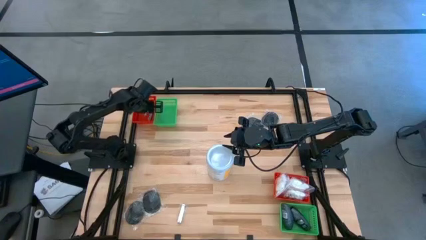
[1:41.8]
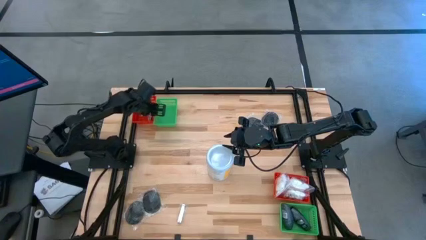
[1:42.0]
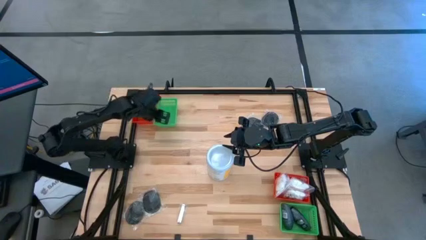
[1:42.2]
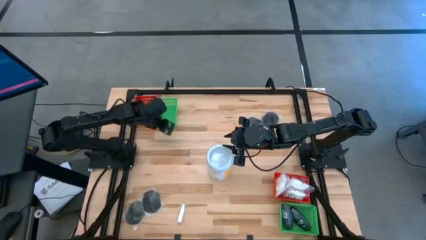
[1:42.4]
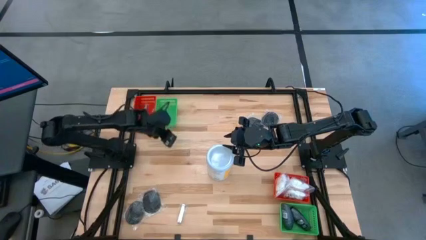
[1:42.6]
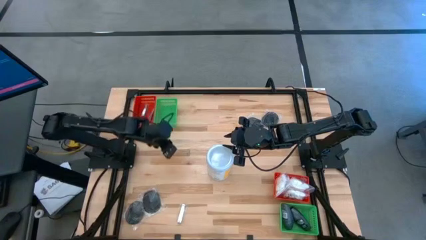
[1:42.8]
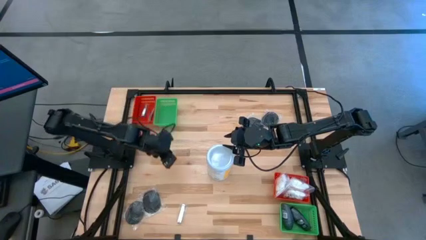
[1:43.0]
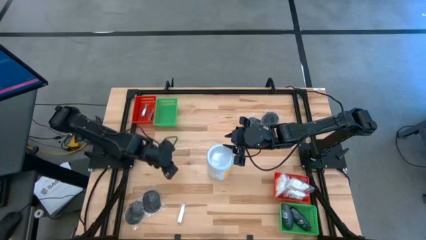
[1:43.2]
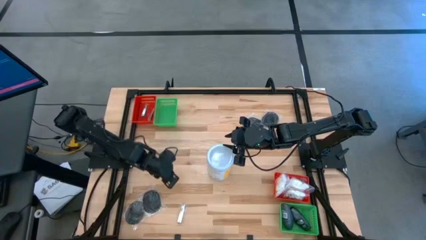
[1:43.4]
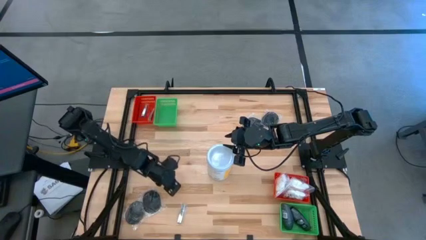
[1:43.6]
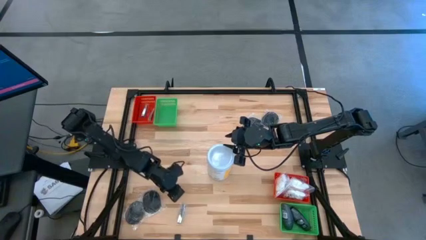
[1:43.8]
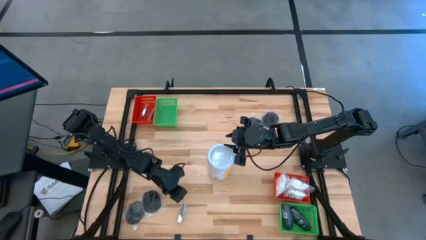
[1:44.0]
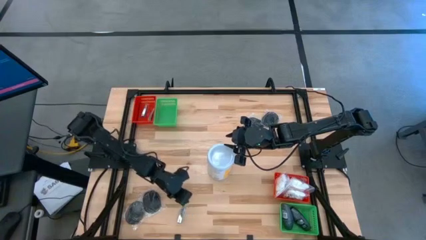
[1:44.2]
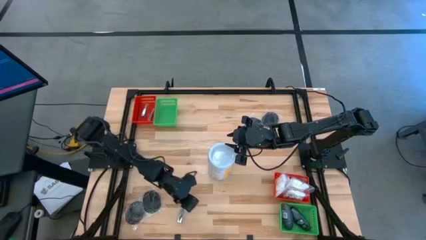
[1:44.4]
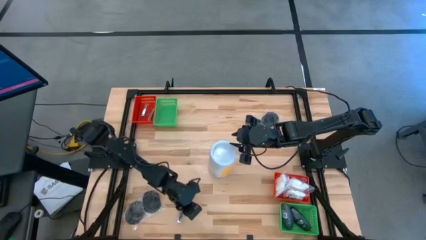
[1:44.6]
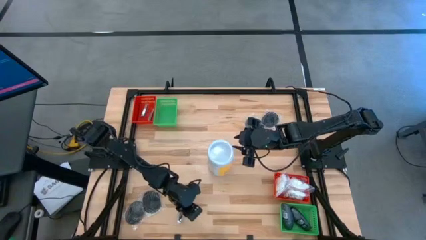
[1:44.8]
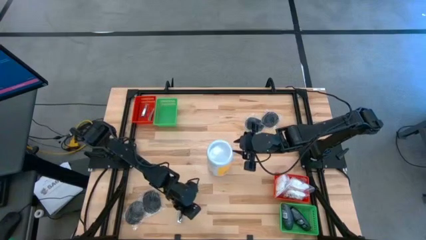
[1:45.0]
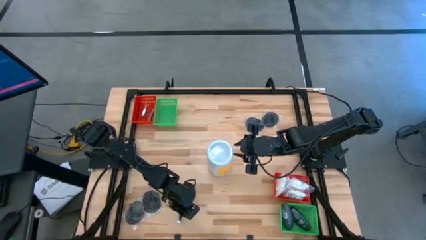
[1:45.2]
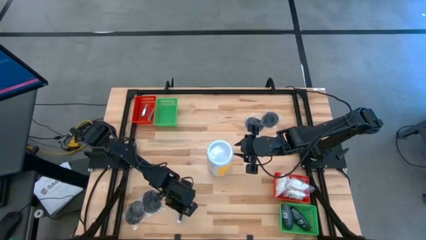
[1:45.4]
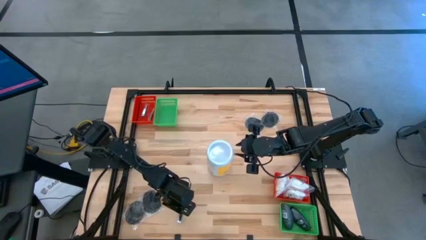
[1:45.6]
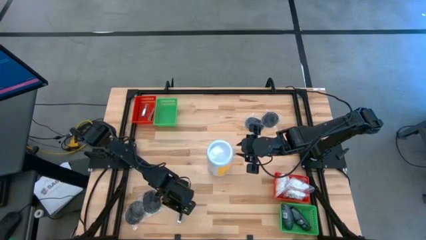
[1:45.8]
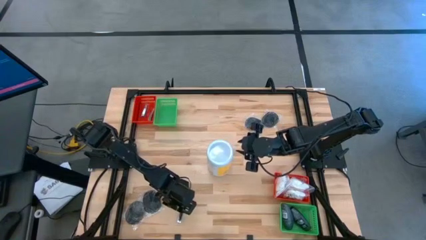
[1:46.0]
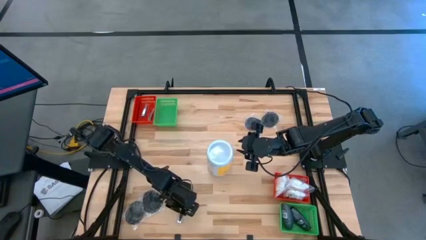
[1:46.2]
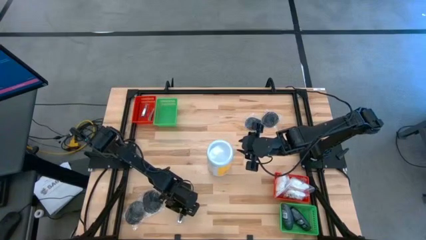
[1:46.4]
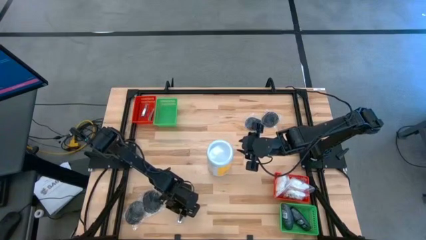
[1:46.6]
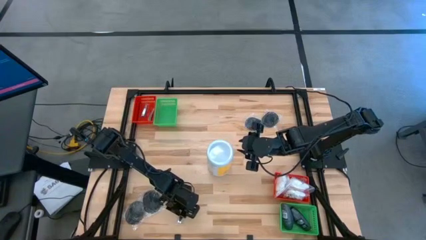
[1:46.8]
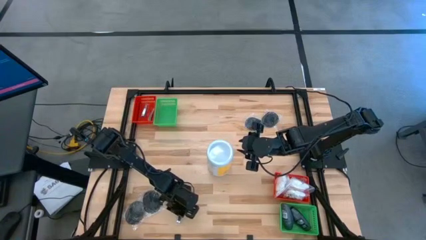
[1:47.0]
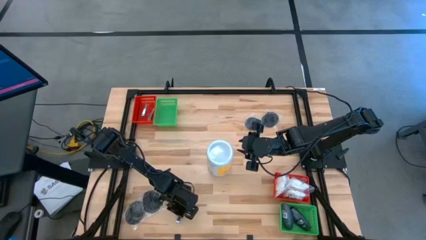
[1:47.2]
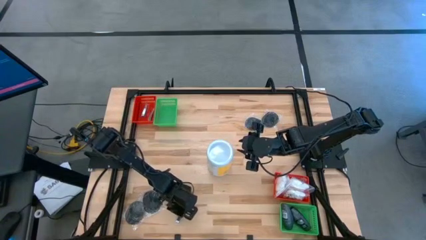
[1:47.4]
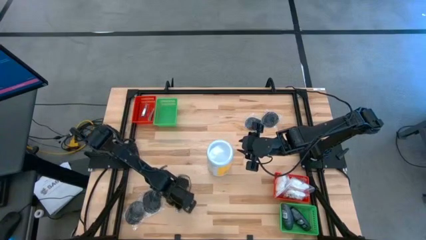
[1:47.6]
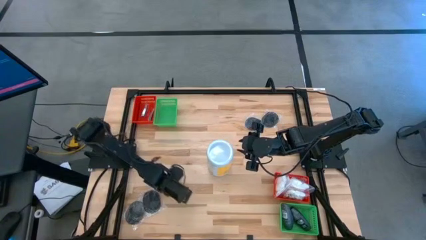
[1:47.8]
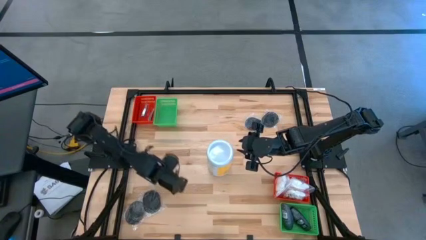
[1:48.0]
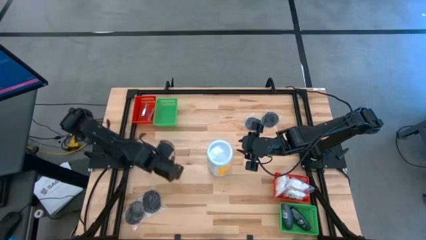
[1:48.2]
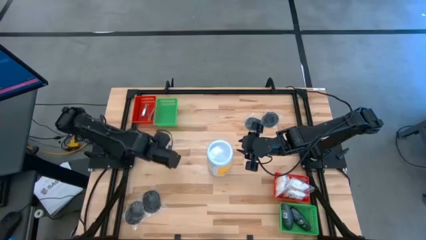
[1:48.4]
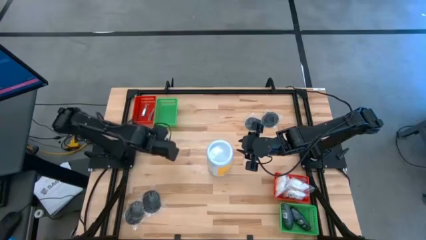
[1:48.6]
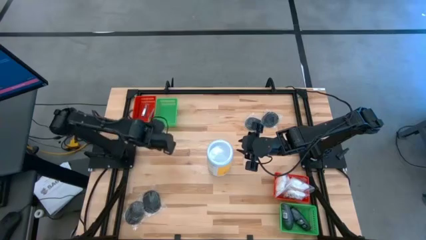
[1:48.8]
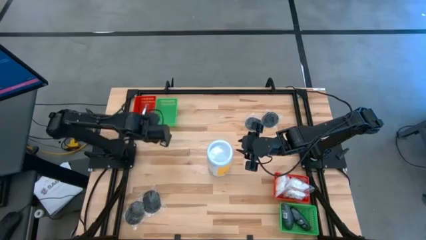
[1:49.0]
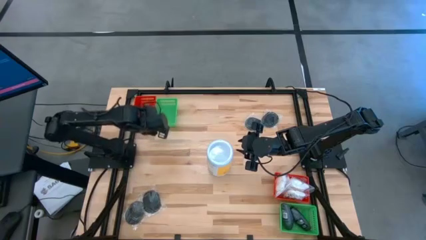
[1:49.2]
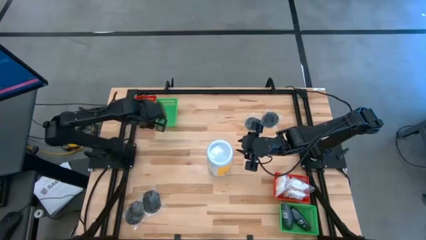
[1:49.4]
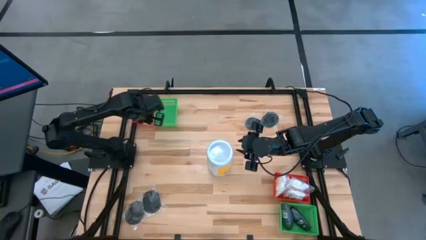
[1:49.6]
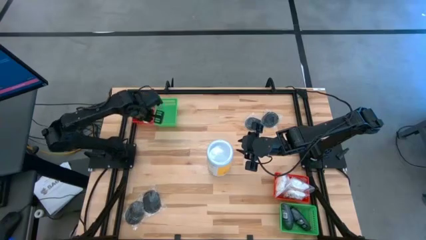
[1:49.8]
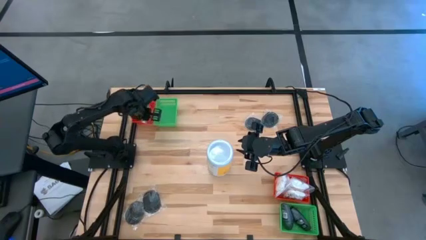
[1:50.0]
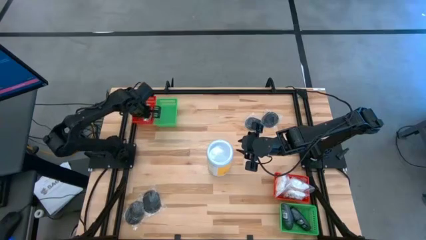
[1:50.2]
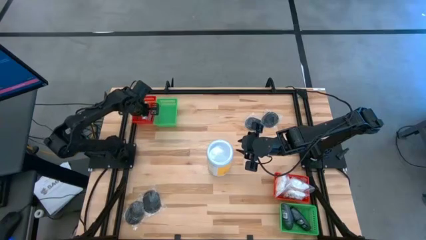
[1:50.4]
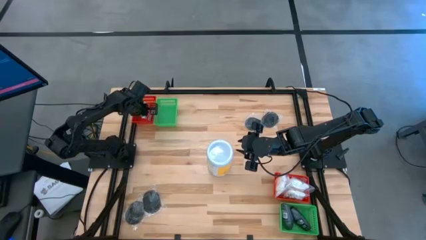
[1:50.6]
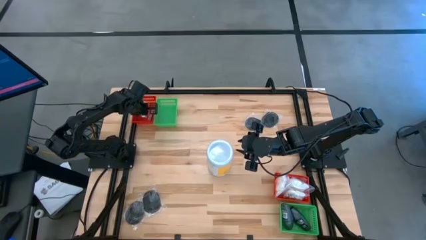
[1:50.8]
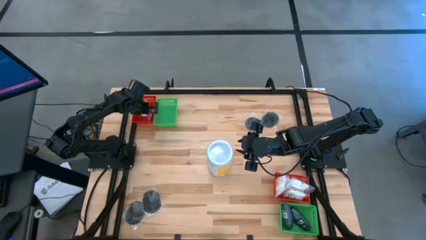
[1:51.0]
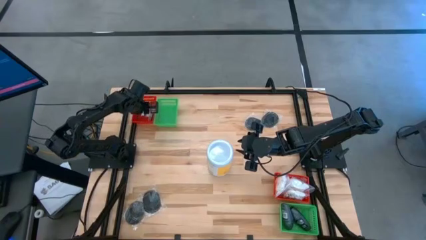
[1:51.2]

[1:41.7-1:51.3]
Task: Pick & Place Travel size toiletries
Put the silver nail clipper into the top red basket

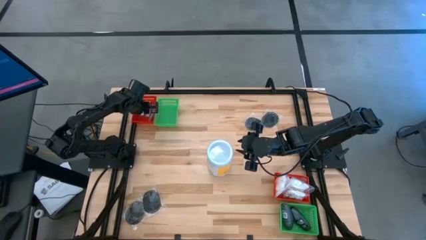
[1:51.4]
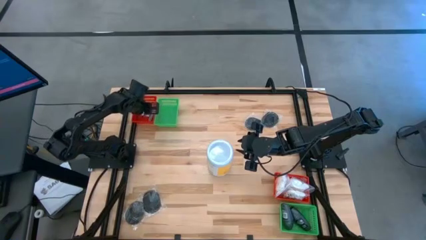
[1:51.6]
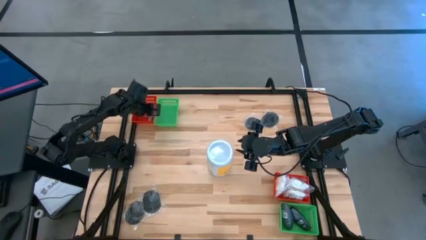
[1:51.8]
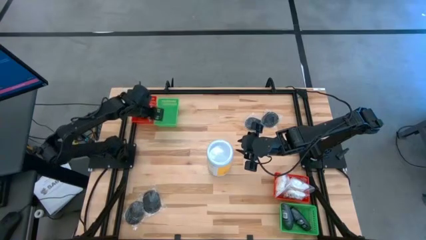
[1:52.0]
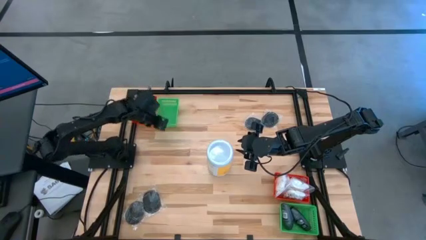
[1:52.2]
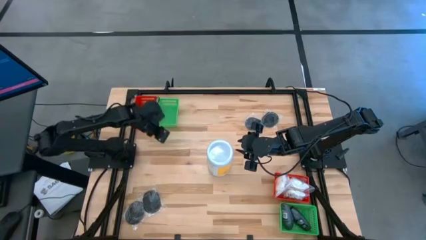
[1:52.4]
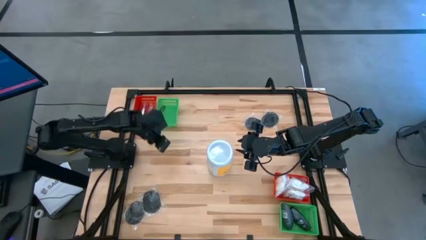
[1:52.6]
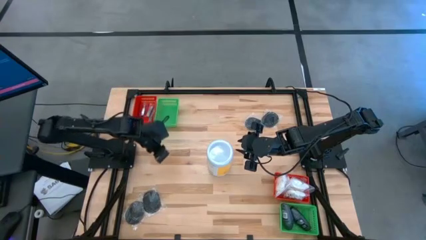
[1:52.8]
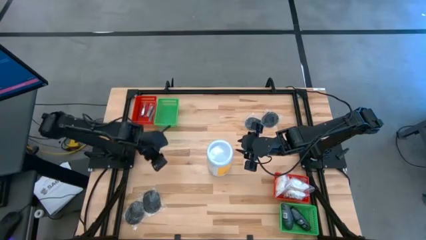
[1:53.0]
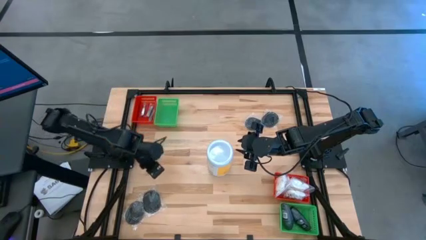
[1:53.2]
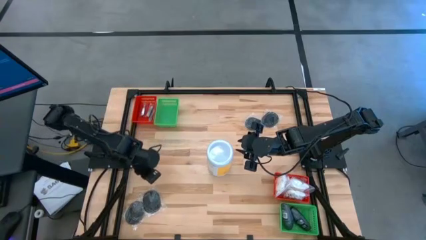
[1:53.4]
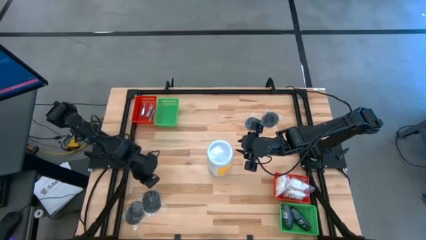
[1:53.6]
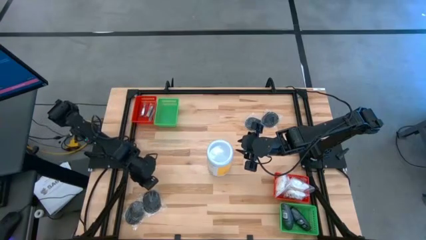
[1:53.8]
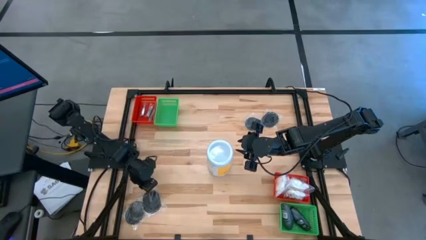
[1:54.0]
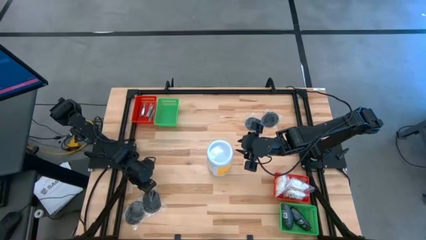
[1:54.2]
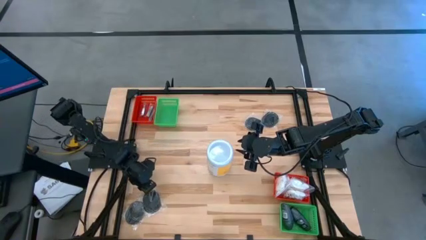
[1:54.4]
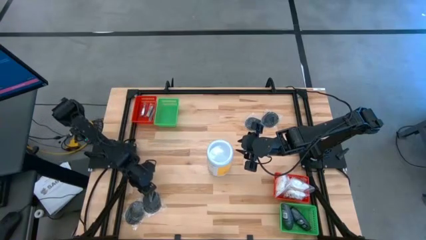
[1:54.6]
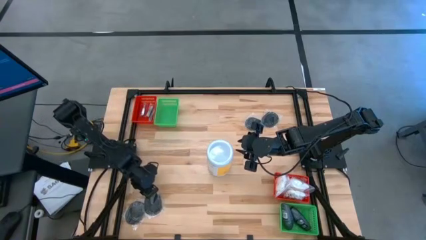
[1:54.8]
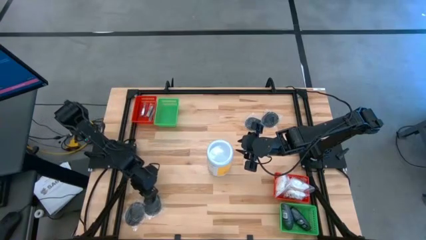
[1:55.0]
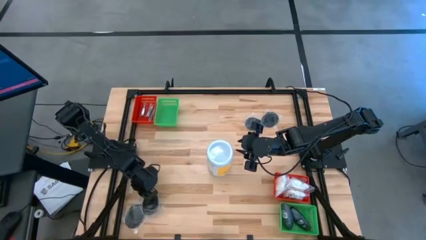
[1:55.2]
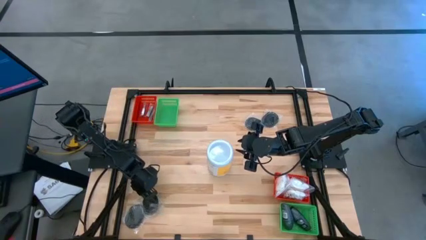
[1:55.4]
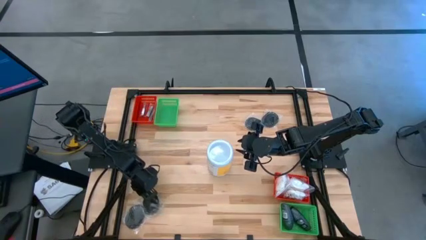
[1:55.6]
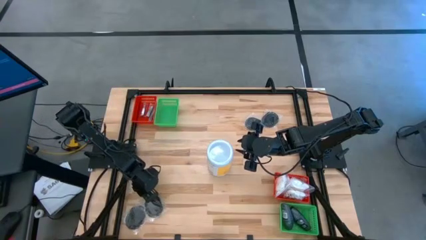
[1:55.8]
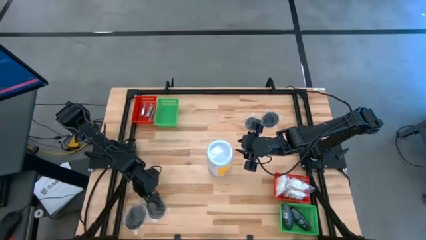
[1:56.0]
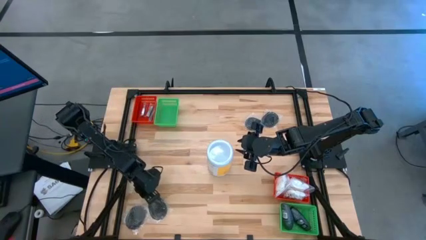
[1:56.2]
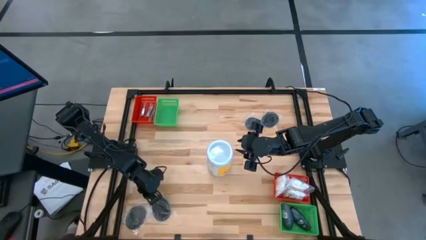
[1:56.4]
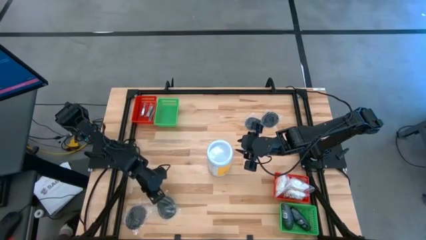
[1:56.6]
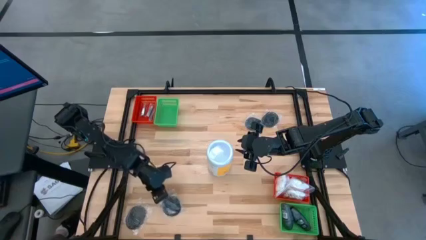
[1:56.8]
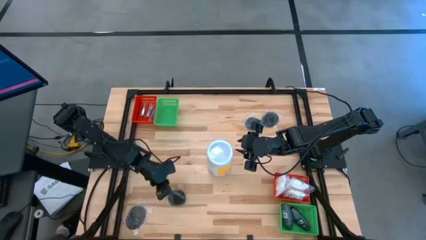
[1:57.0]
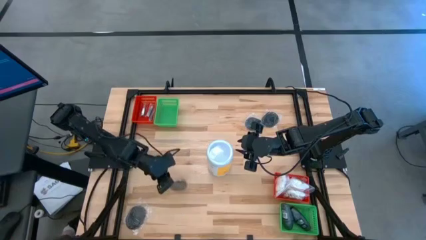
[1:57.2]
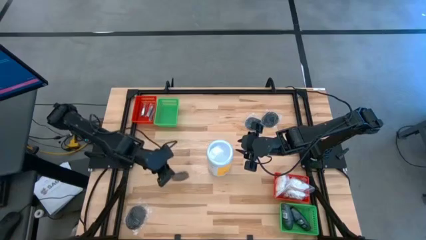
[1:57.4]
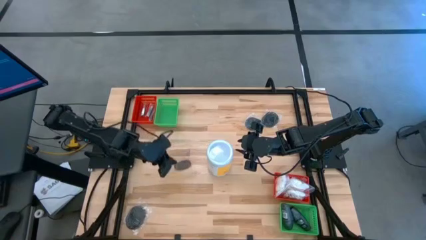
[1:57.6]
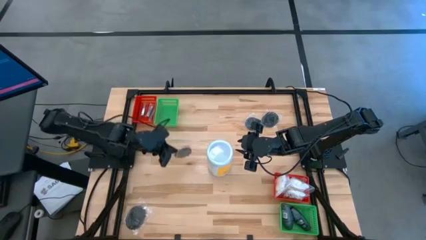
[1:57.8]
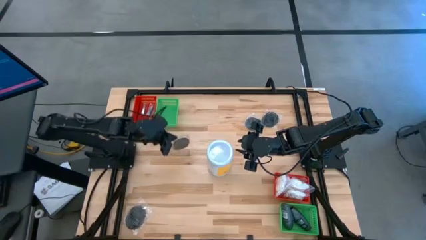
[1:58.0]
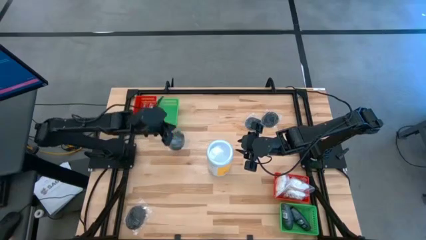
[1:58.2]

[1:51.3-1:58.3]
Put the black hairbrush into the top green basket
